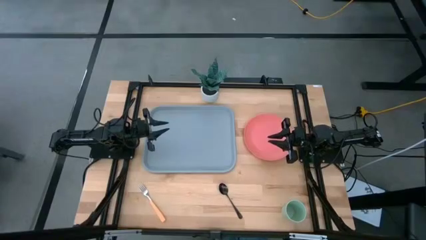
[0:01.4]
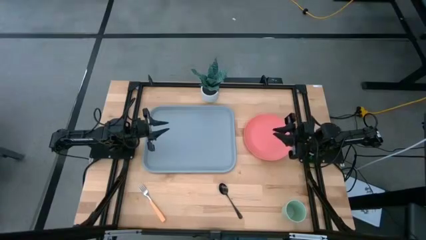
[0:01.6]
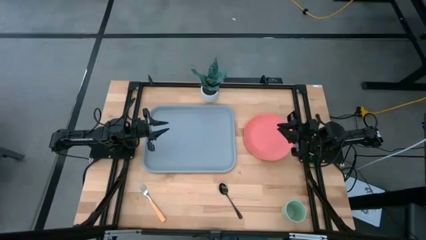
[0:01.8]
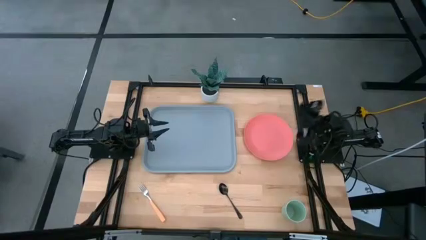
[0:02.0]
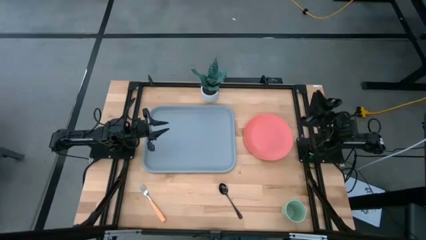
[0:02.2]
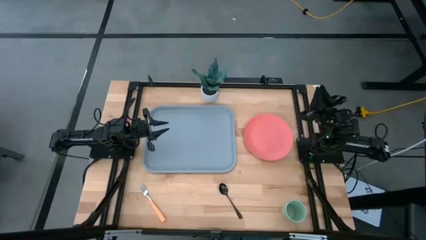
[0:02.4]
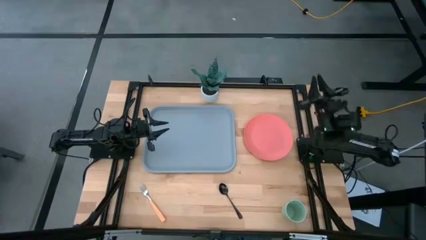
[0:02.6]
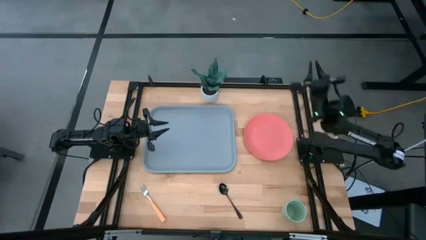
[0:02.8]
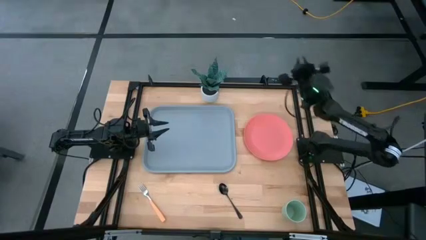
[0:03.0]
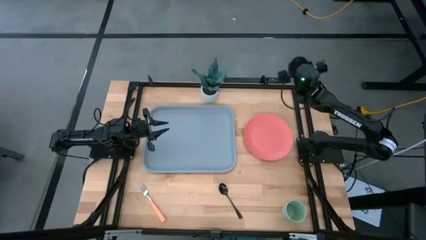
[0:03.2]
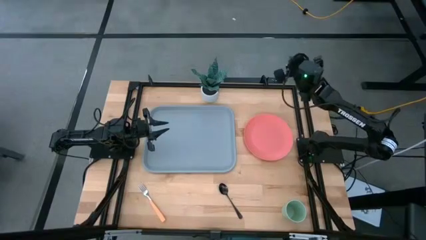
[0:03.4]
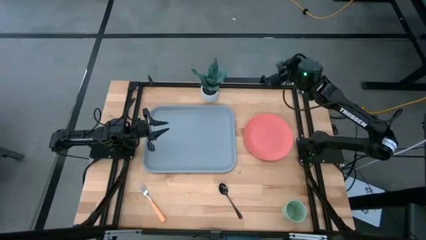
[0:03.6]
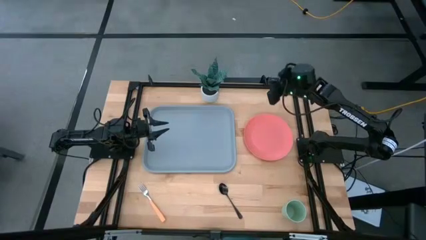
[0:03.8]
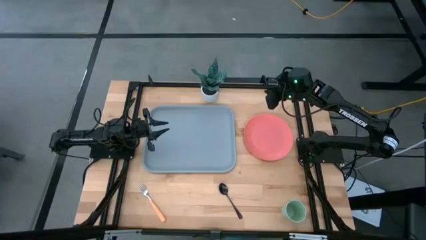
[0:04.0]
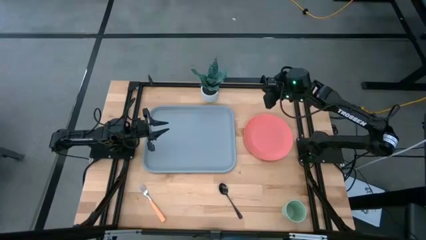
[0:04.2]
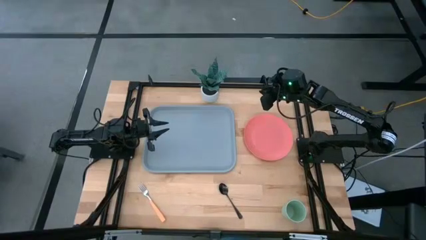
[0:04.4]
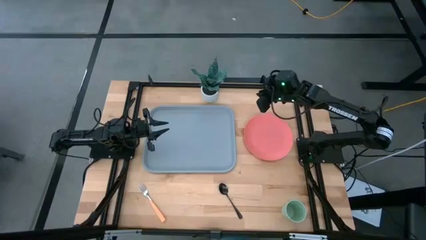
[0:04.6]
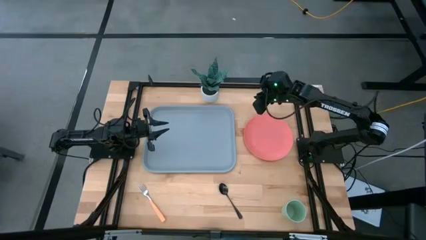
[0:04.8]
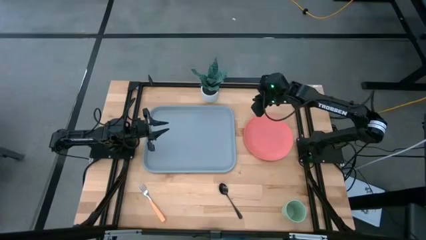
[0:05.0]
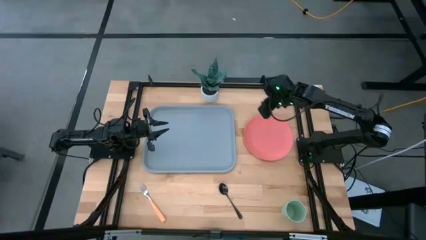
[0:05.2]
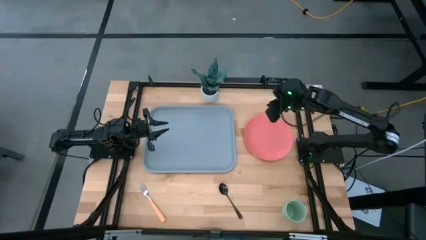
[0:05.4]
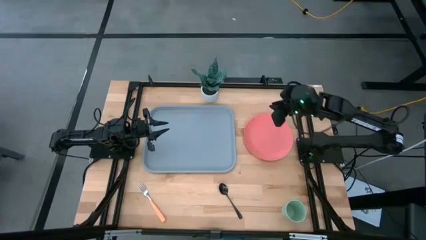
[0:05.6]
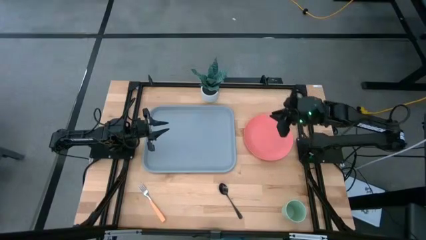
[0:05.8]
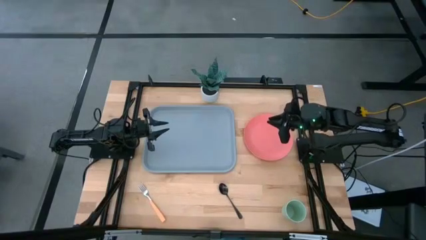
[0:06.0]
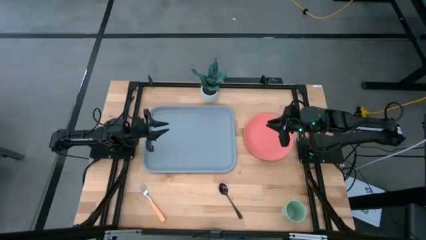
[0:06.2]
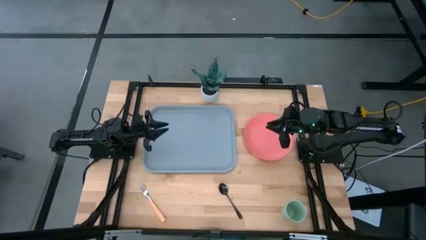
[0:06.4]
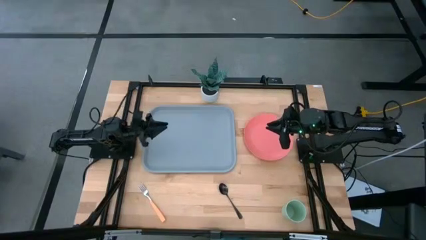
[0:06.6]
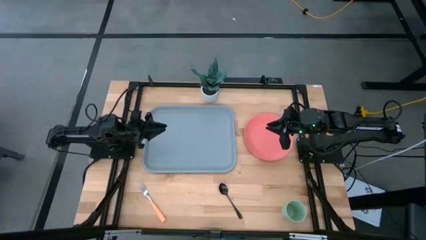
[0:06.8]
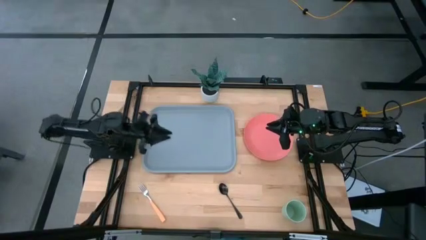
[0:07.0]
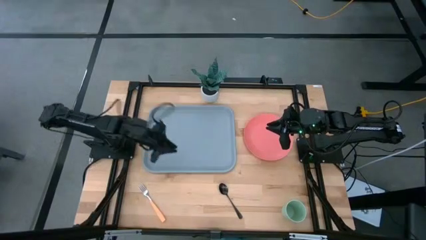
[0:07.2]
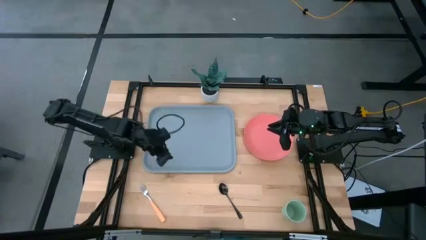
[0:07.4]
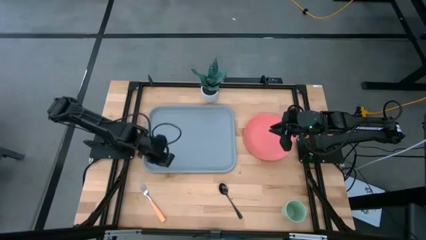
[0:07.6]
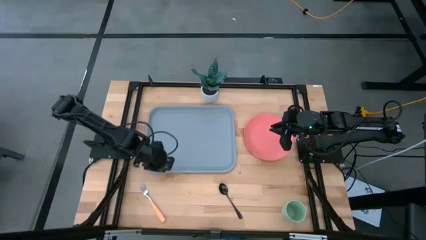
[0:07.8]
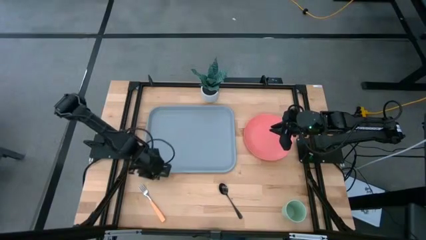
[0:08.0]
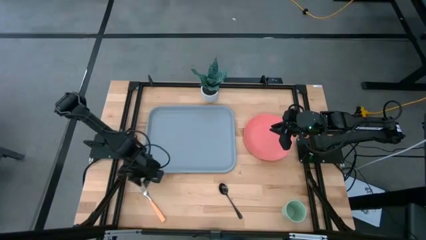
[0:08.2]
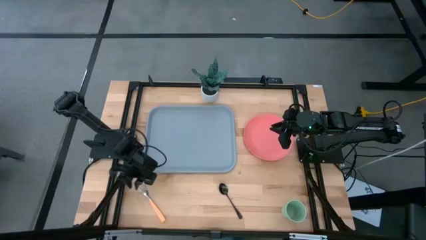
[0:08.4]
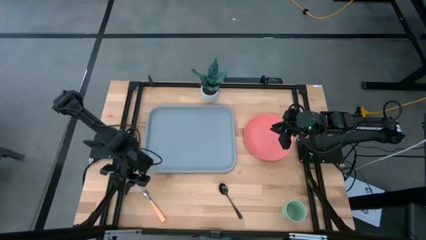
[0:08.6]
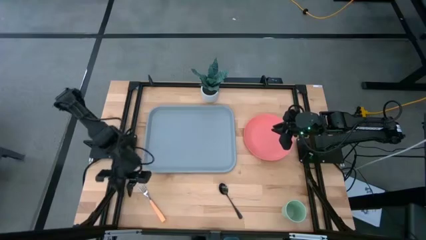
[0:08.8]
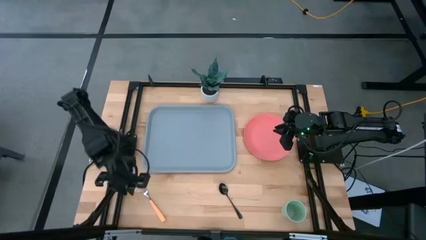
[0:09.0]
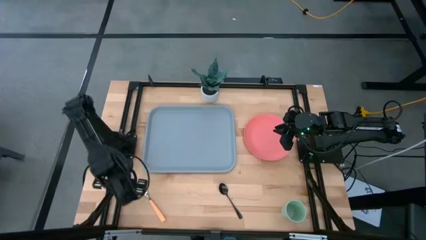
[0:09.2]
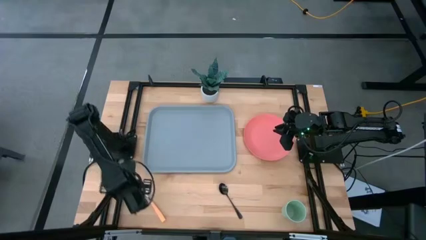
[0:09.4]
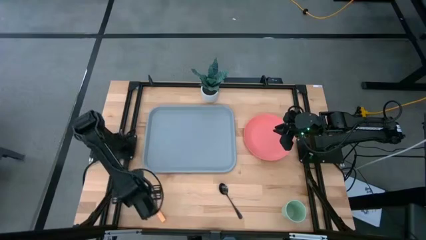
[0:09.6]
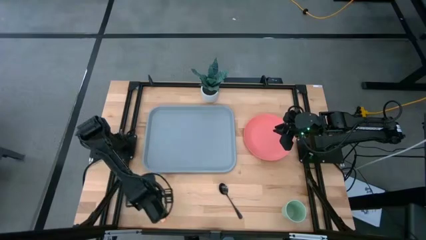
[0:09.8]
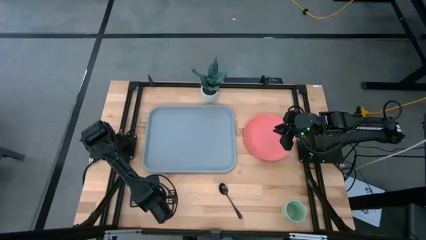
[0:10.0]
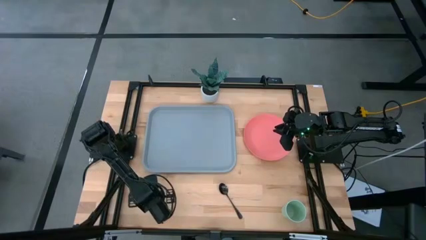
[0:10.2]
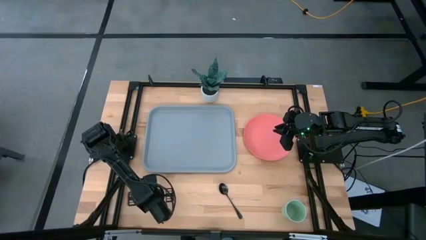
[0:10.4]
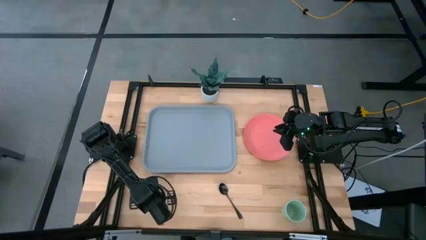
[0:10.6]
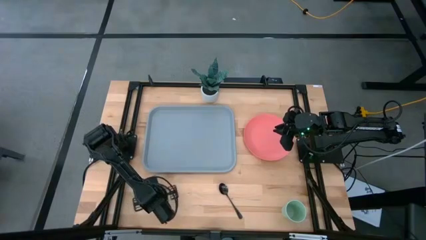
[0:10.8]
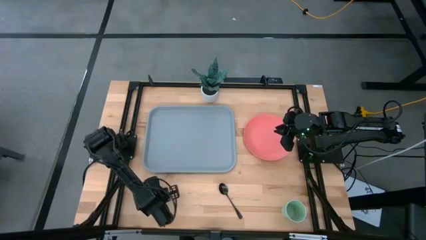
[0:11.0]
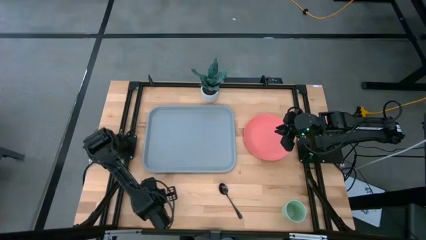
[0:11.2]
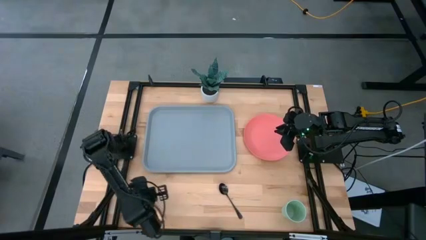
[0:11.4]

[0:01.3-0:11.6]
Task: Pick and place plate/cup/fork/spoon on tray
Put the fork on the blue tray

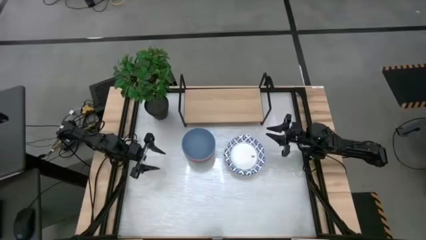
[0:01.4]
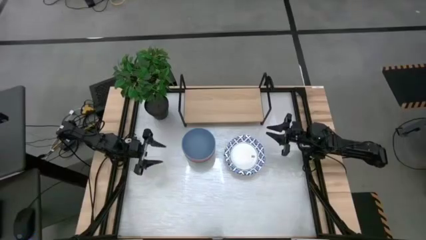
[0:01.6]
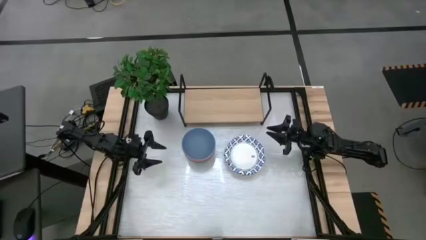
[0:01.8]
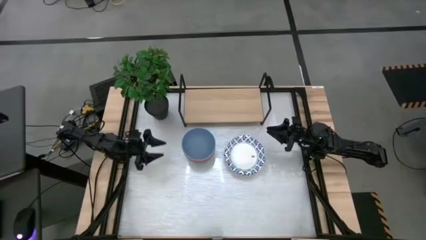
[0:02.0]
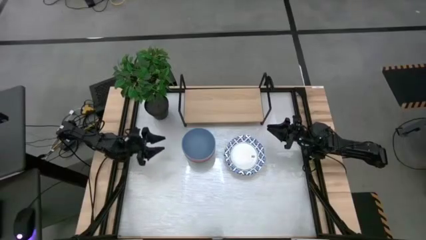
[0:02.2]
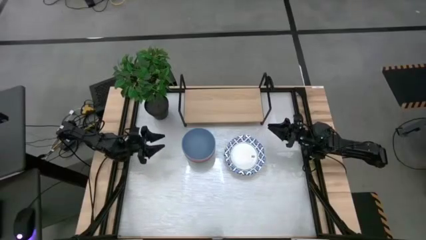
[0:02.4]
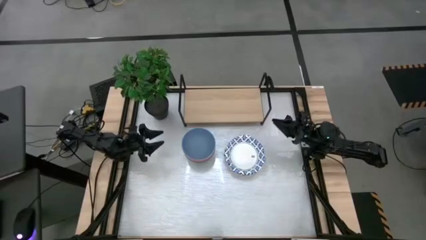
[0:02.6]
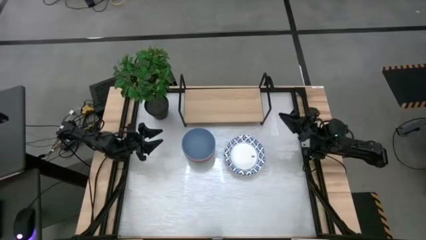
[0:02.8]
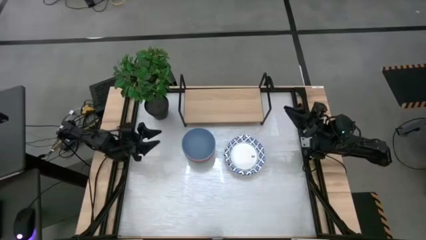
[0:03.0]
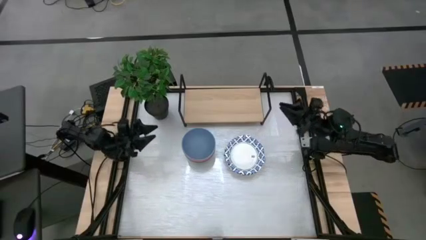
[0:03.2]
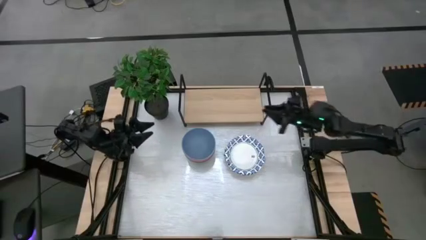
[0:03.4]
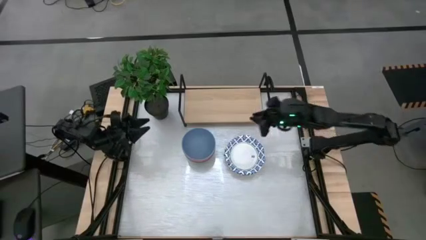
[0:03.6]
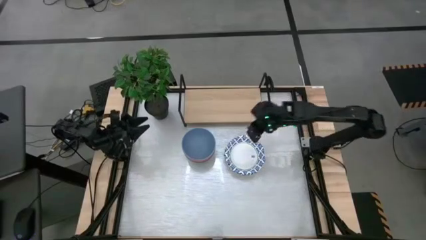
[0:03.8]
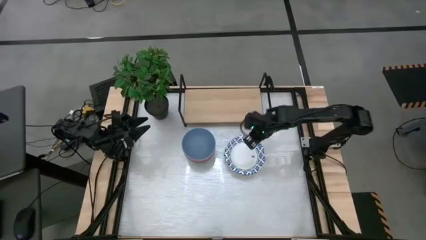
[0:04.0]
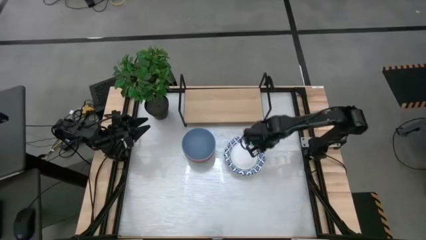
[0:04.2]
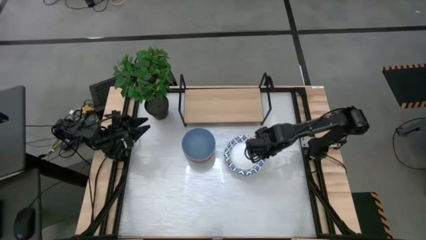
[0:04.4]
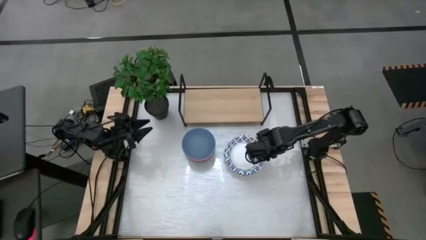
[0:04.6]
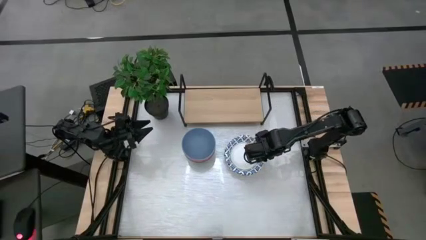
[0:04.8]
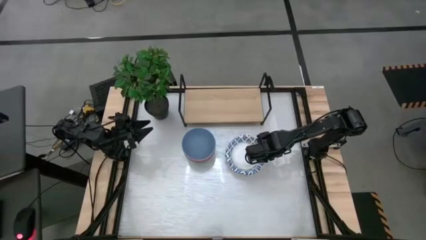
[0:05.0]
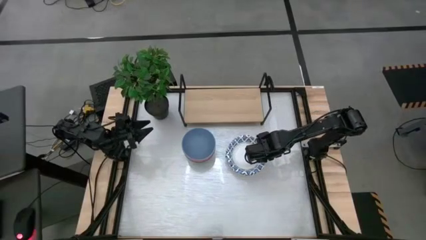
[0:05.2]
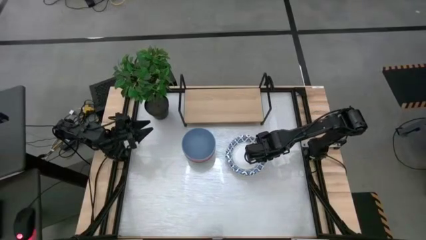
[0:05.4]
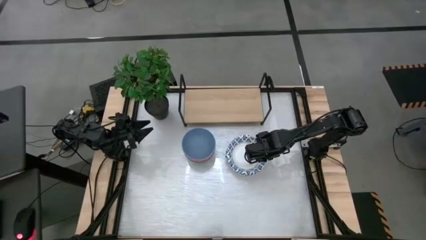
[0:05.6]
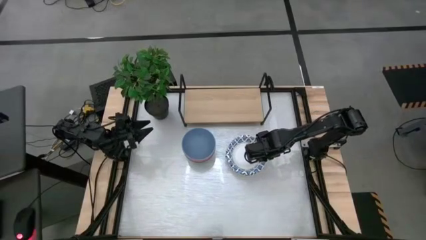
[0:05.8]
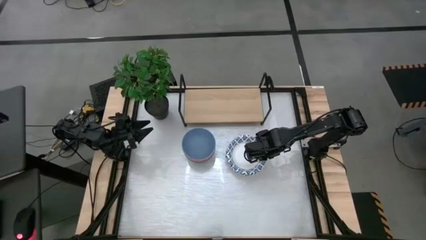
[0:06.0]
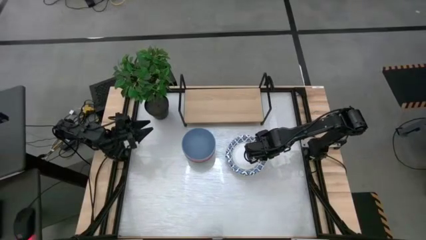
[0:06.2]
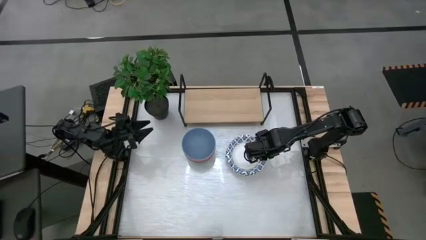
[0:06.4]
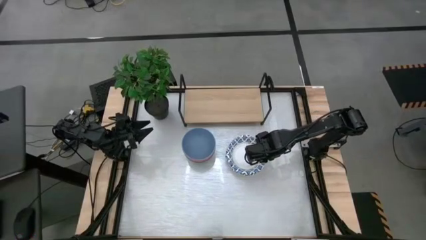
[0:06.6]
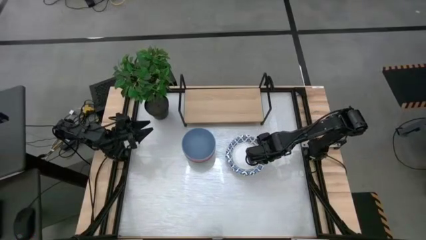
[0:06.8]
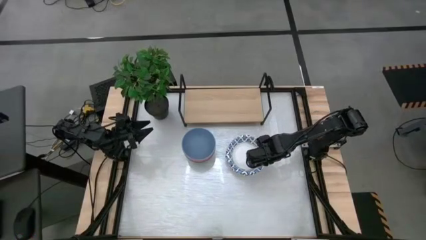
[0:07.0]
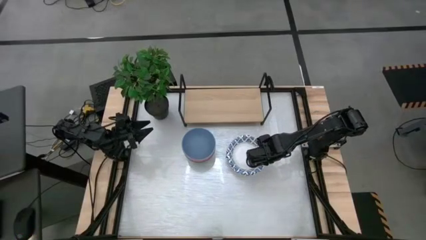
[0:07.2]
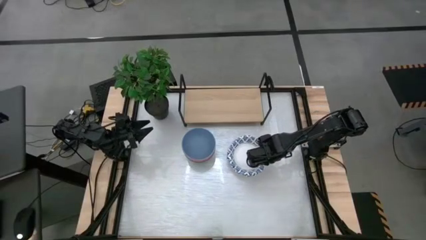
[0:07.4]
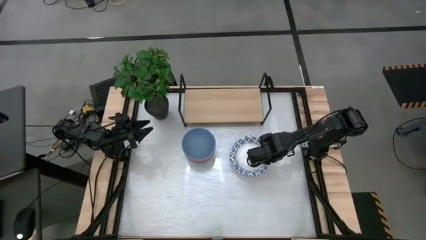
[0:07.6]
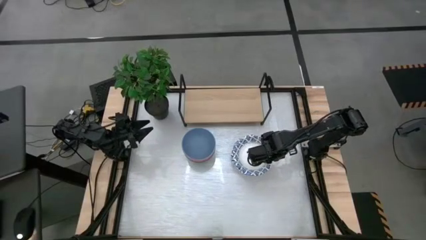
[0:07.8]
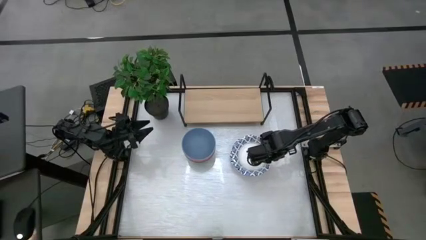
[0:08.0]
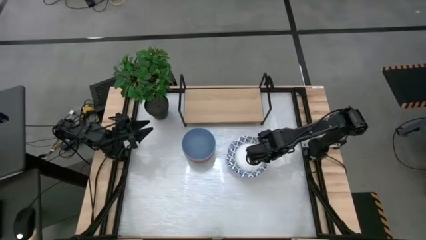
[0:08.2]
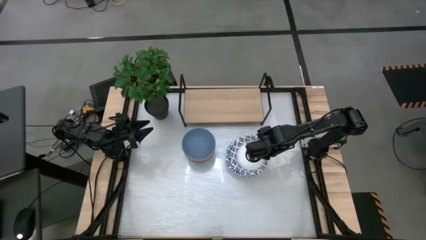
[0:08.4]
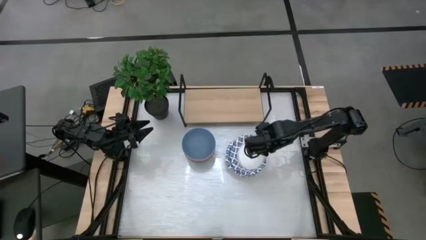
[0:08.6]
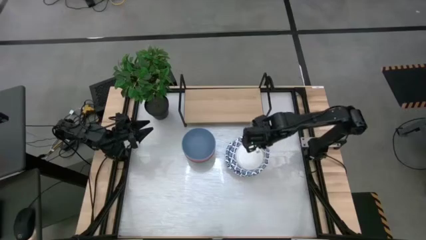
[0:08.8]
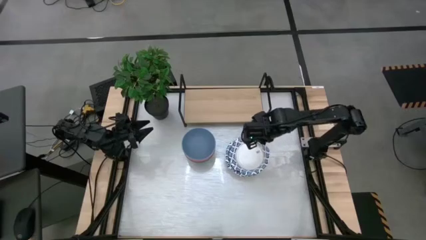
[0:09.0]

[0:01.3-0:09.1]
Task: Place and stack bowls onto a shelf
Put the blue patterned bowl on the shelf
